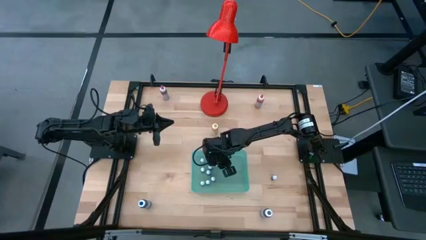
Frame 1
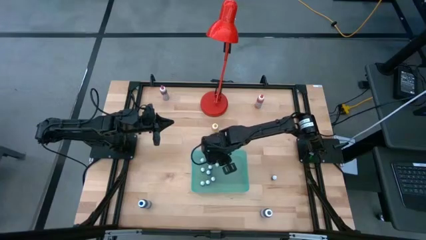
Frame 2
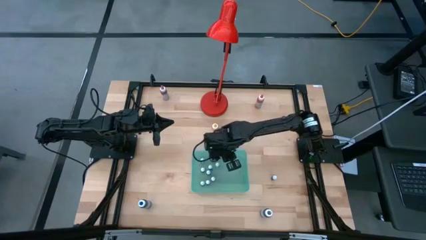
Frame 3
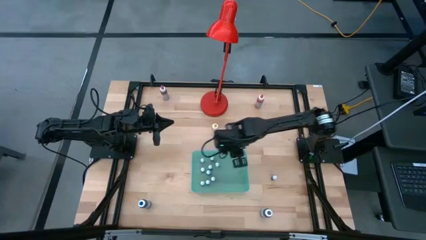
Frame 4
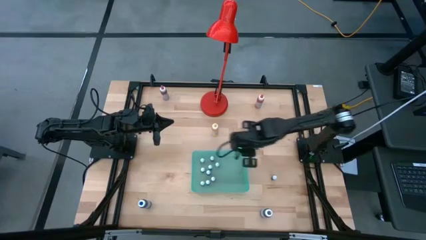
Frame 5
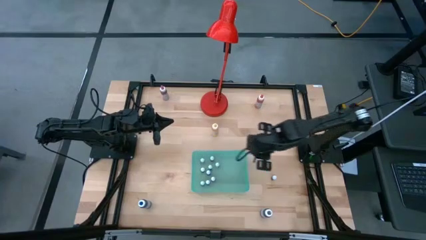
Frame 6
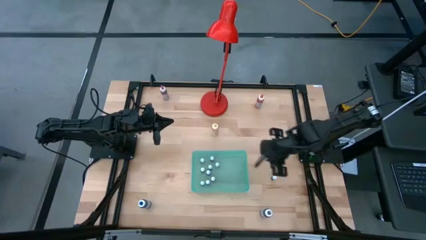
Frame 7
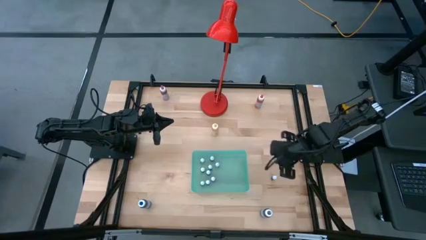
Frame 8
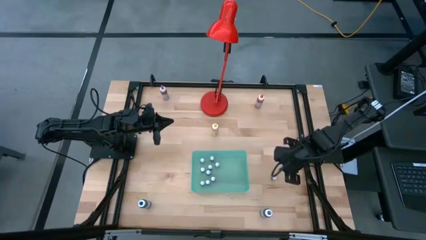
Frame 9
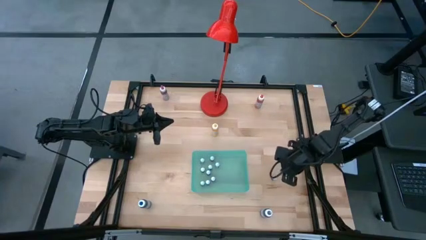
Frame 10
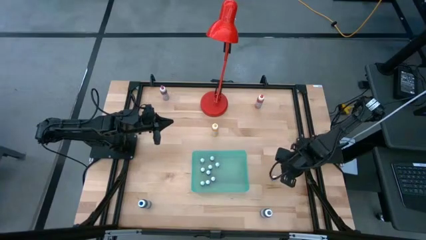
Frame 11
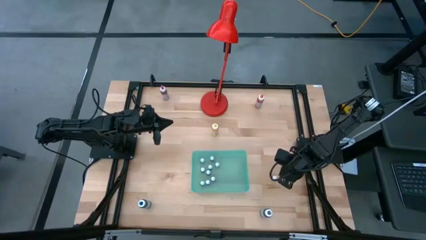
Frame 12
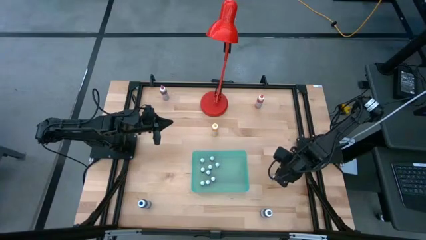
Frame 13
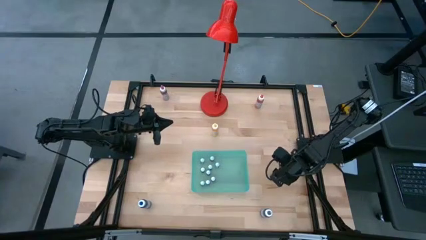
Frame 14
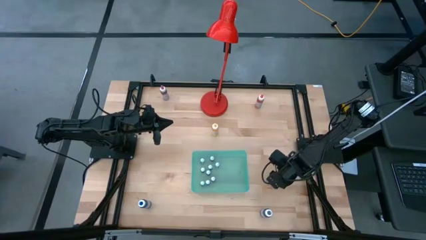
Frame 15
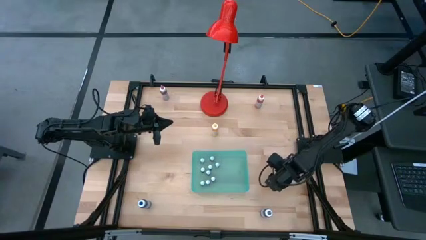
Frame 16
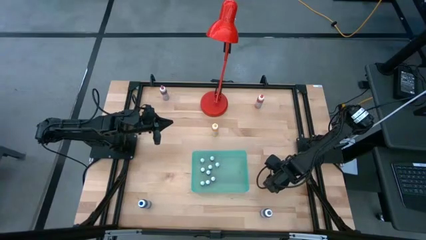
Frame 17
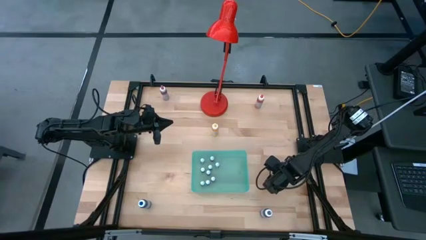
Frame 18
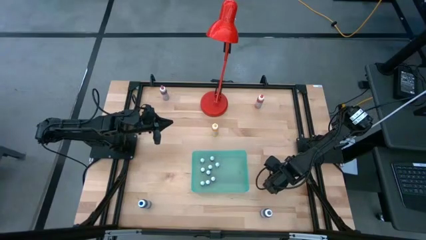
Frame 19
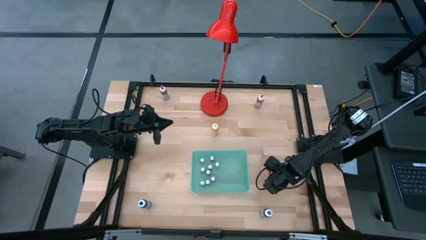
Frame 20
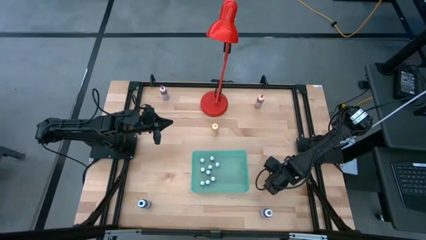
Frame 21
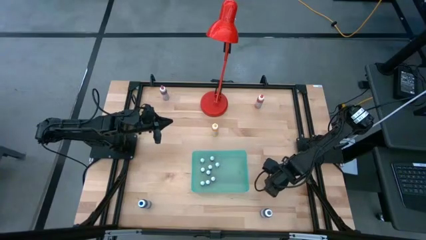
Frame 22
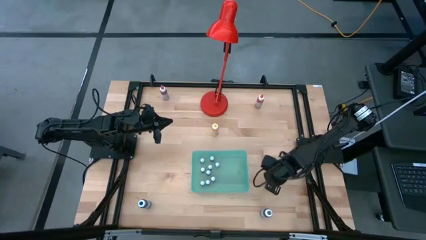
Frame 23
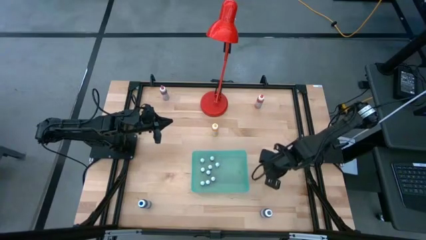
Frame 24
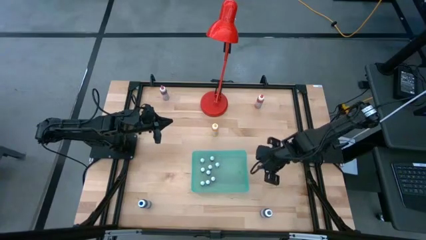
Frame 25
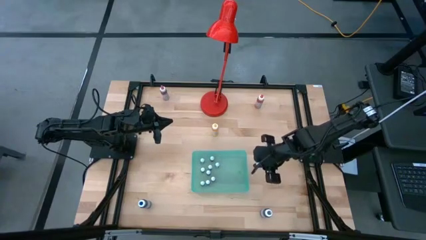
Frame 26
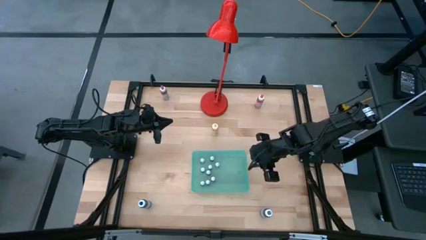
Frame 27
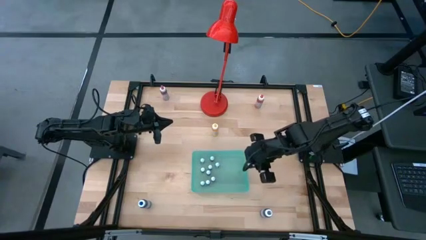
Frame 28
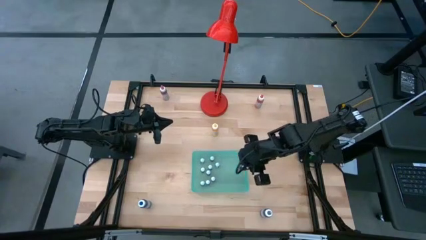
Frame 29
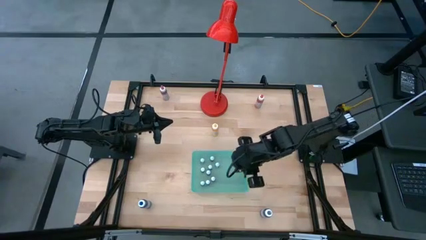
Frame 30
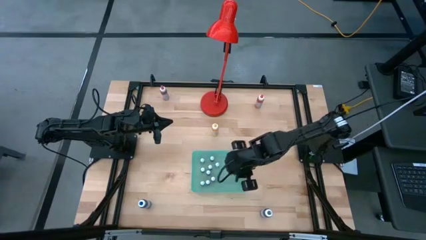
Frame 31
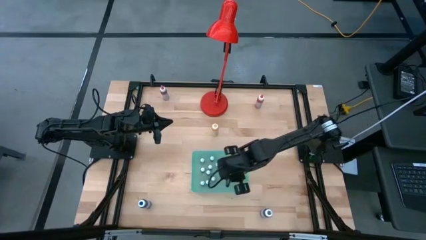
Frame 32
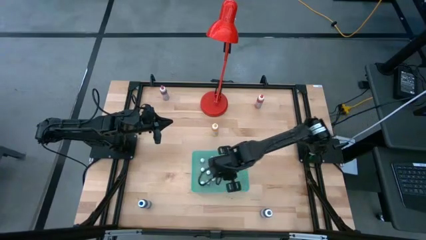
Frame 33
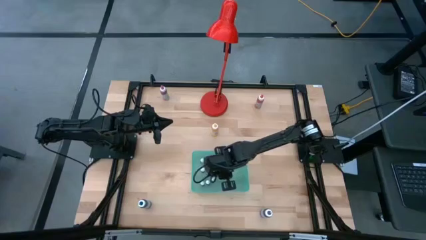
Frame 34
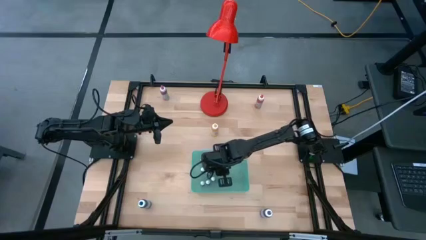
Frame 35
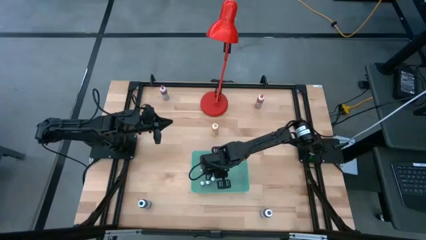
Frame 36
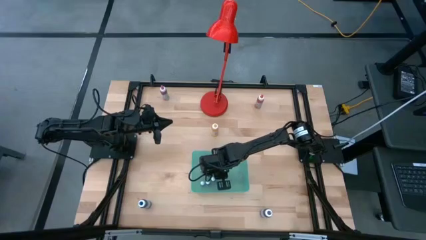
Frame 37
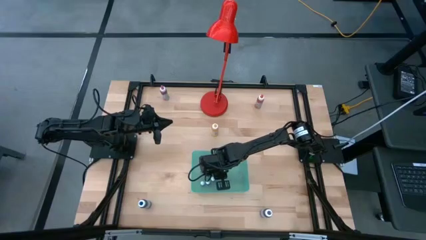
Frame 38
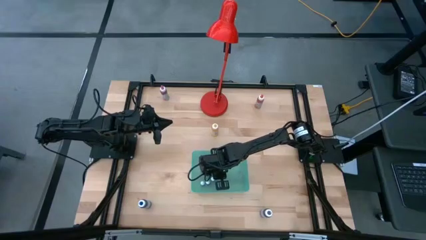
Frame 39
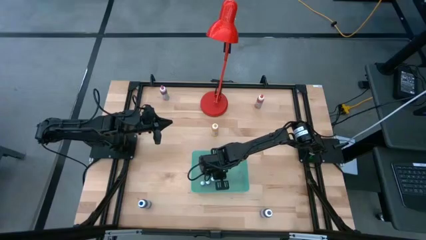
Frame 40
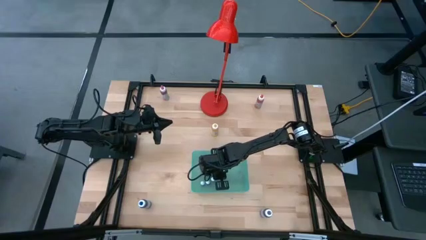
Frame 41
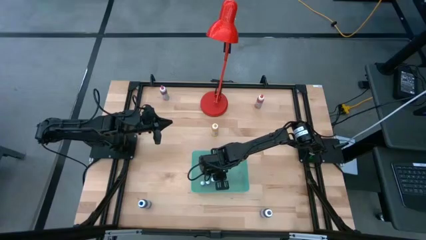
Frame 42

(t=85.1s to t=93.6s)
Task: Pick & Place food coloring
Put the small green food coloring bottle into the blue bin

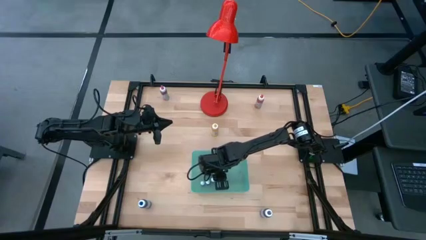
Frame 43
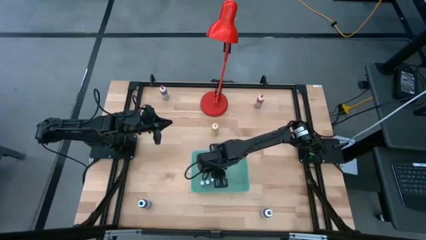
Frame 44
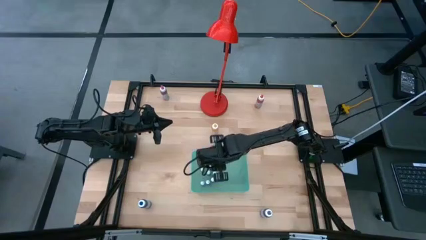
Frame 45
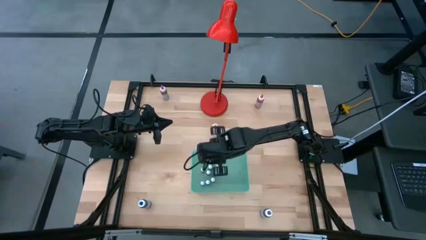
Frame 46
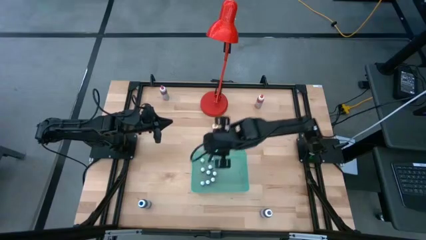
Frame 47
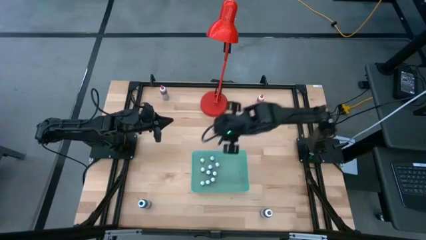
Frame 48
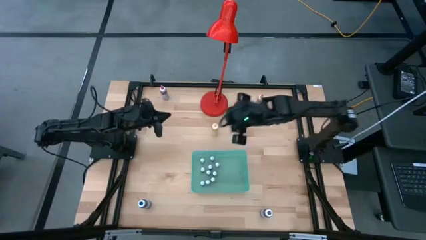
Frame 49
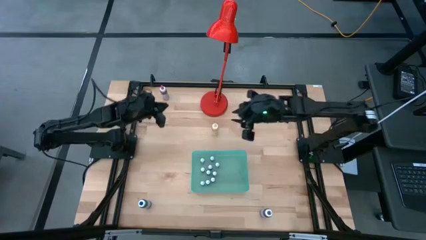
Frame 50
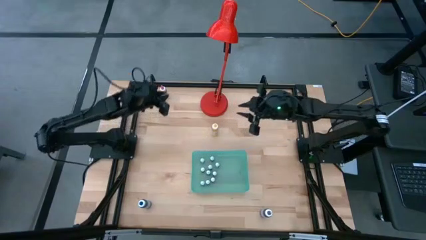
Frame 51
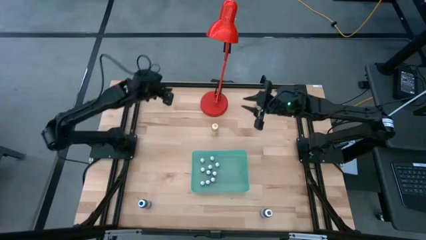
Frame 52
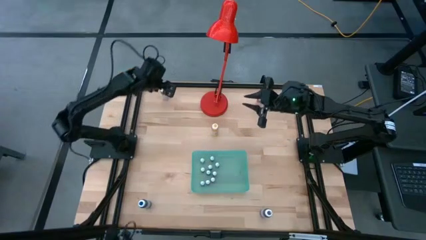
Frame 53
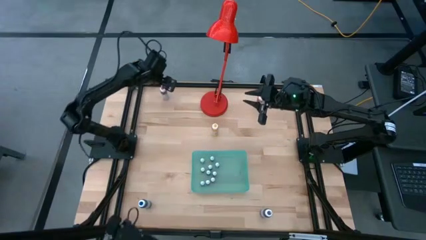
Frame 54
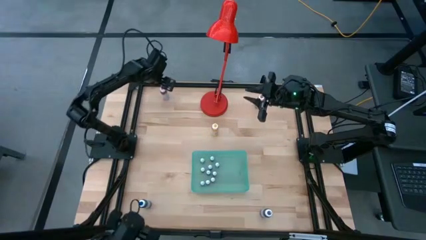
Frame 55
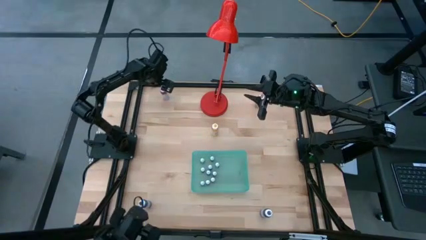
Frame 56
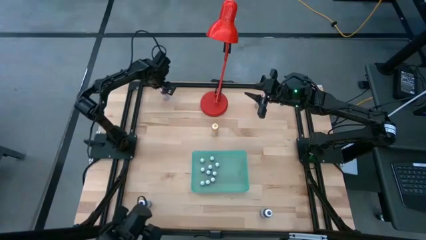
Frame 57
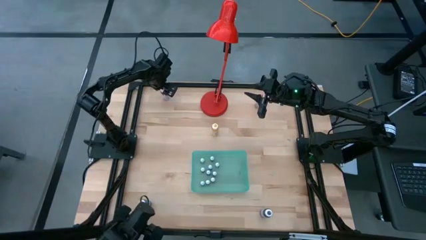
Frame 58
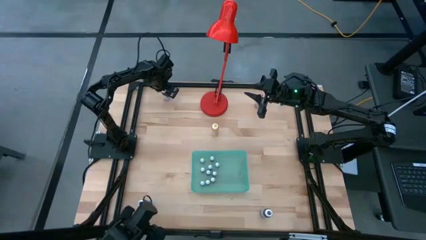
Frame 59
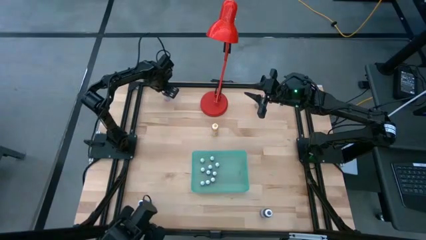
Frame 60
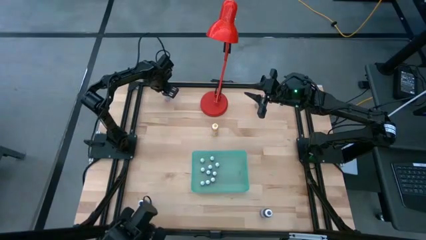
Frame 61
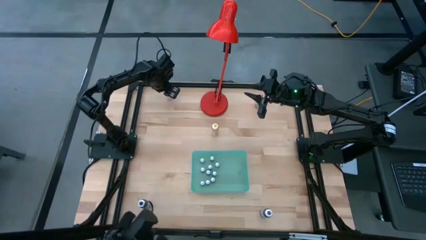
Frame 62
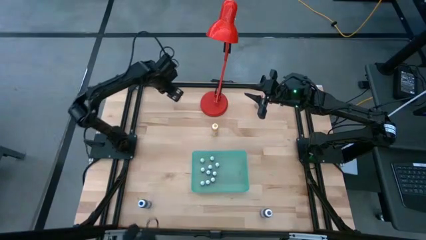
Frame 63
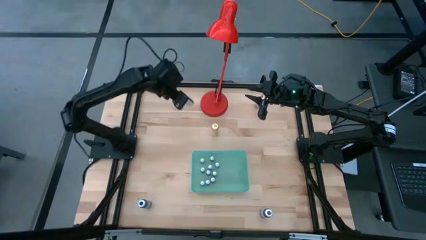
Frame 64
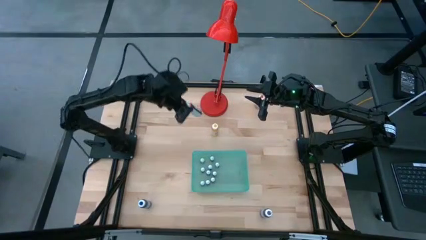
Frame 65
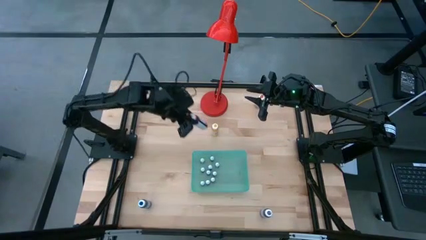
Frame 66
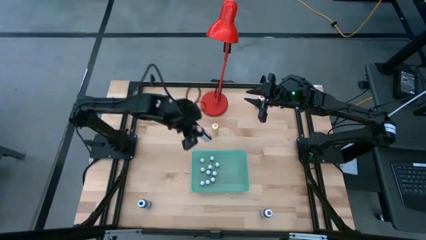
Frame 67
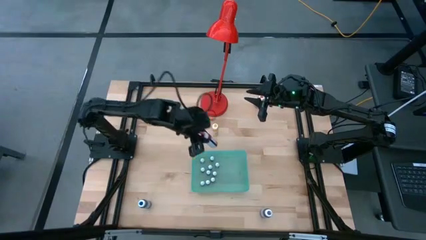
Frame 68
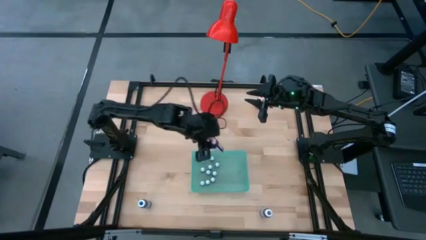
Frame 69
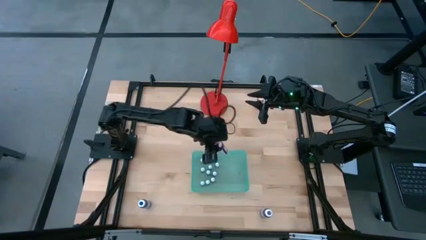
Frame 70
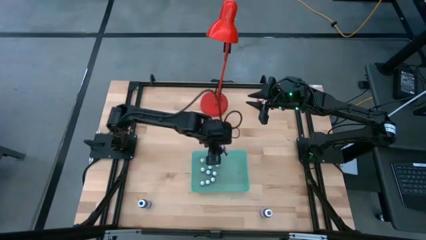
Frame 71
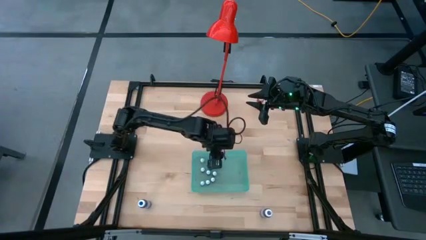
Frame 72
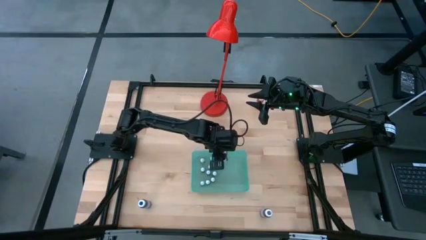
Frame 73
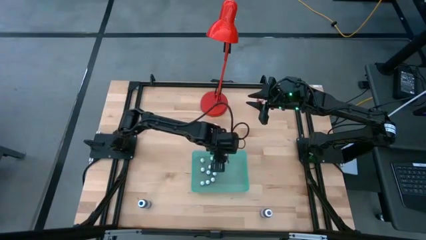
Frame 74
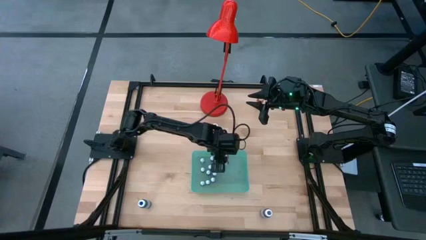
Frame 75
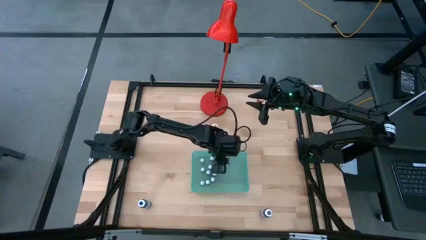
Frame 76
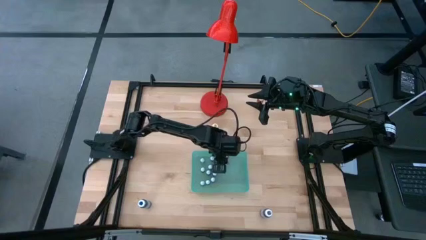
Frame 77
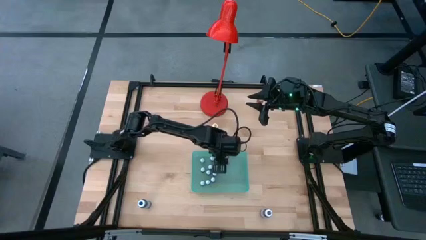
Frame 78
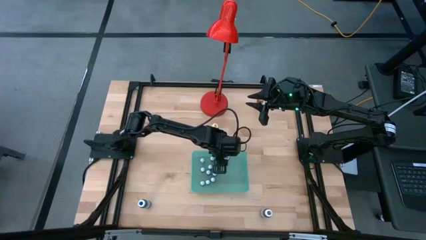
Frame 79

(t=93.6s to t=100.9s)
Put the big red food coloring bottle into the blue bin
